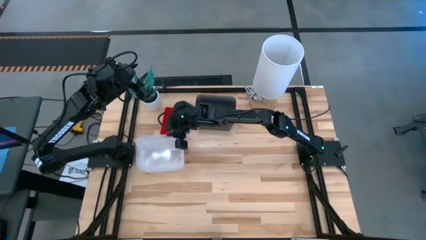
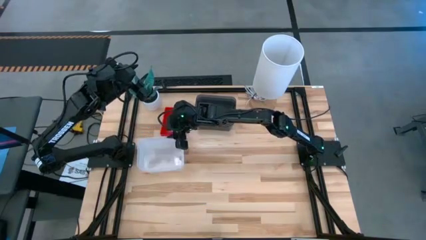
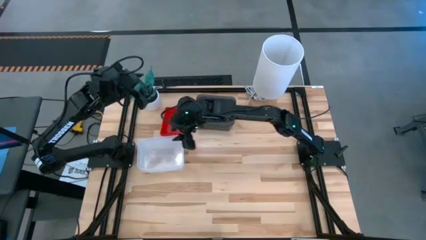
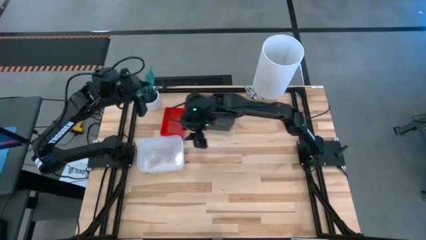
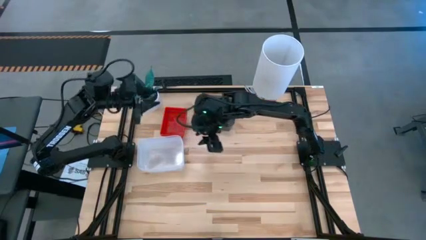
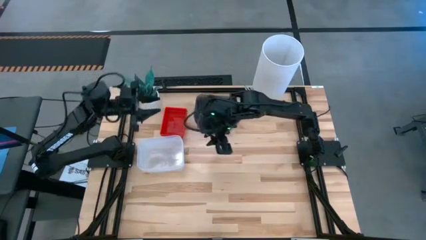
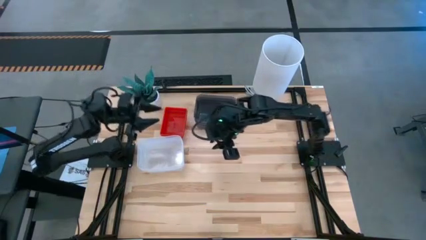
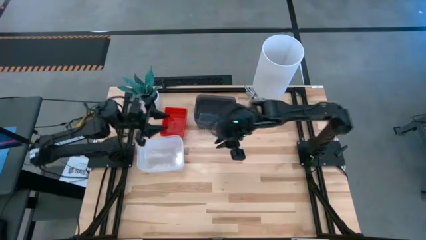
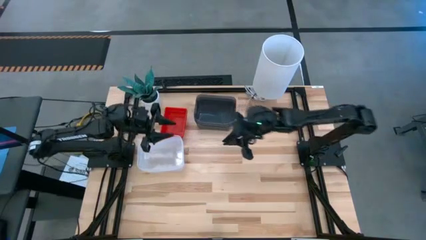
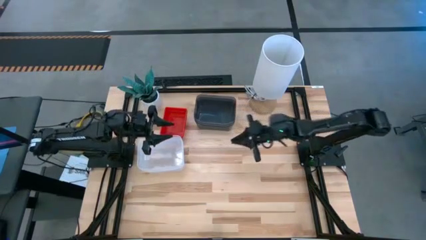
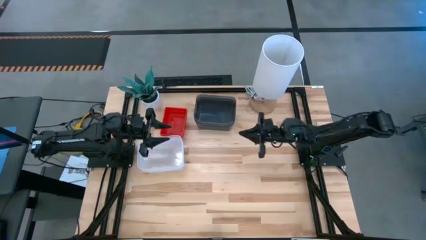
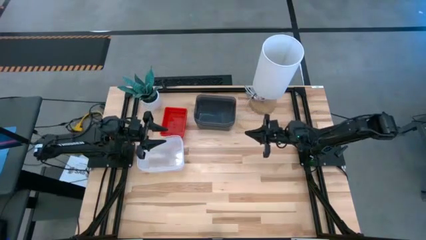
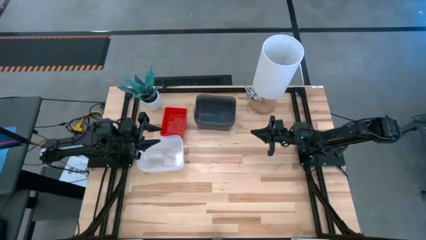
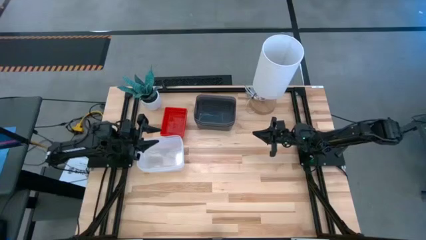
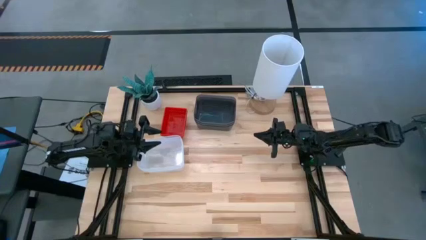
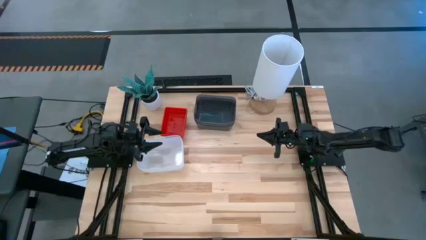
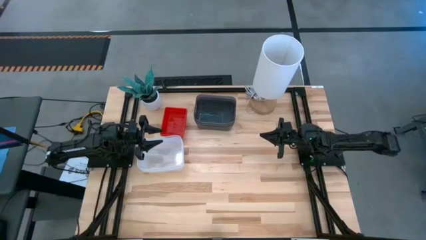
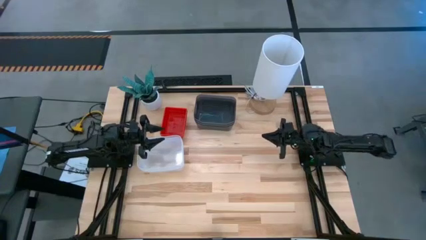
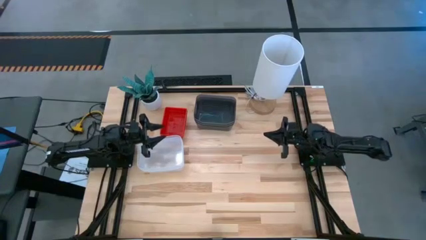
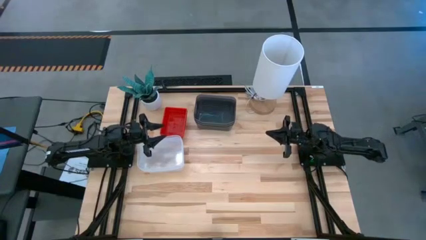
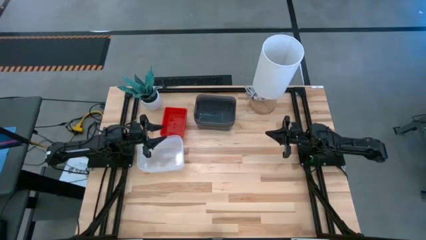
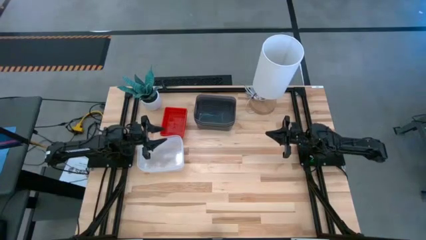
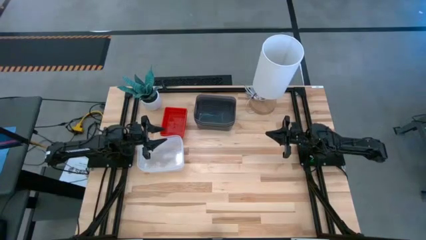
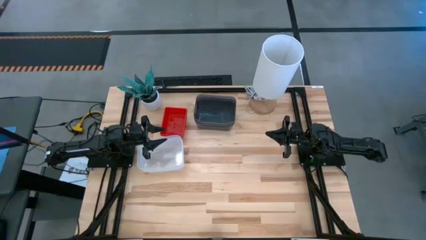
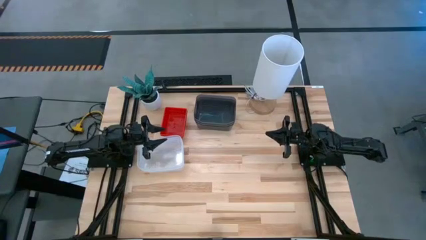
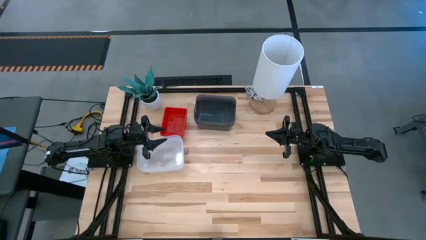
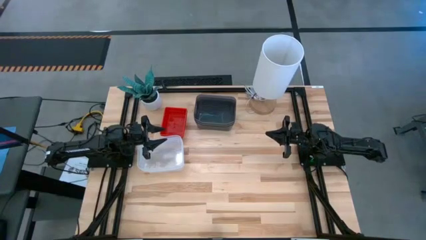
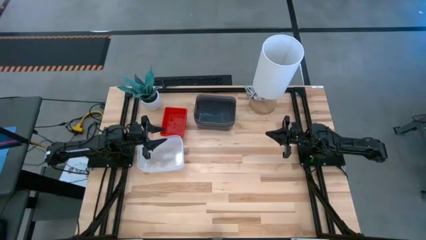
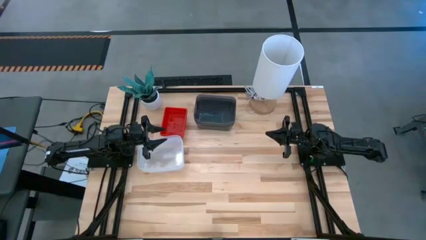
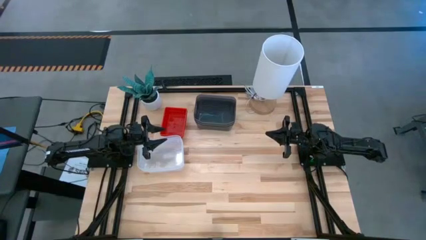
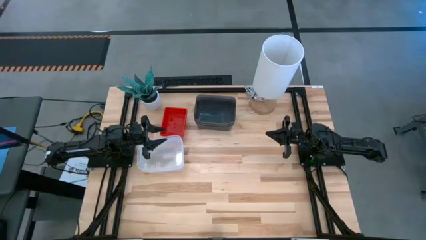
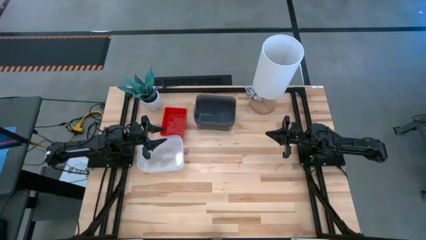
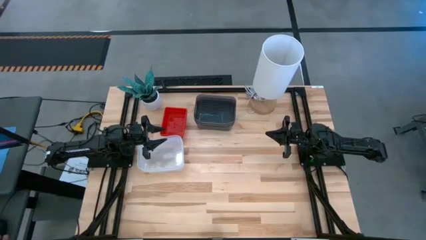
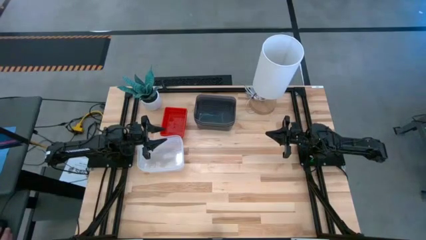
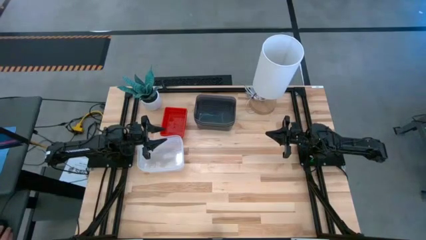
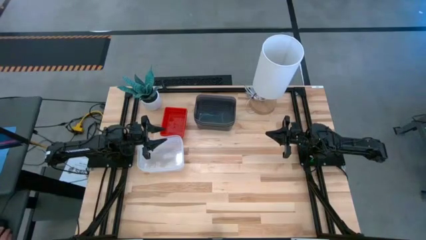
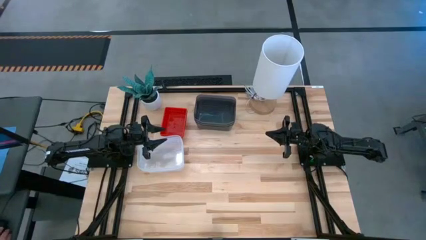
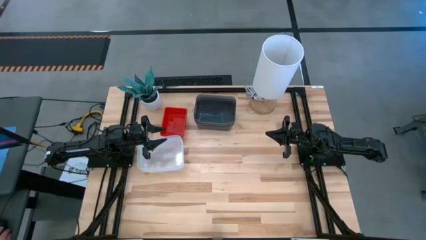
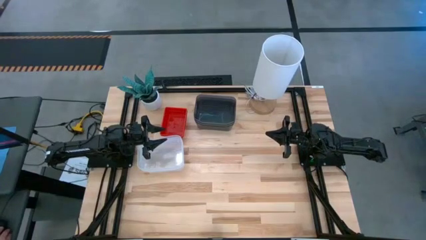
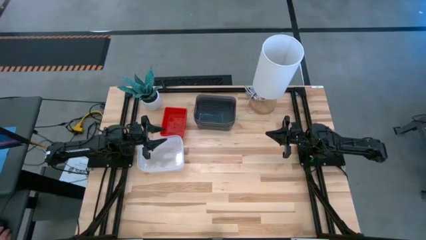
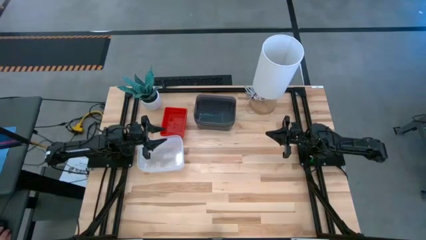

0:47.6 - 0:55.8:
Return to Home Position

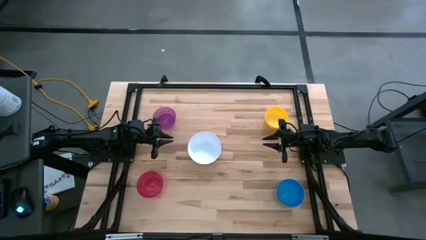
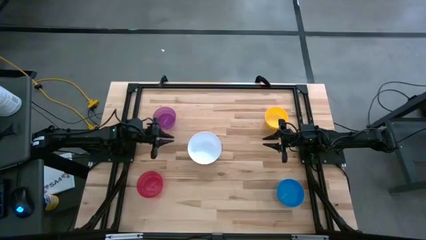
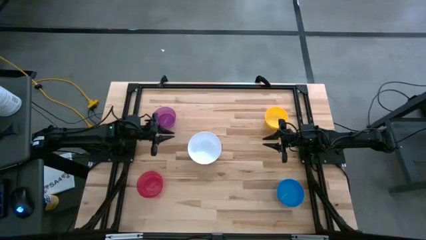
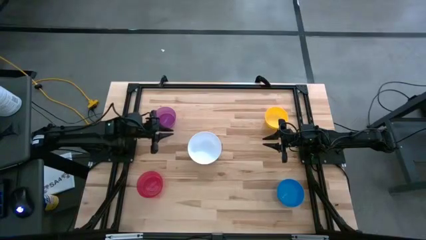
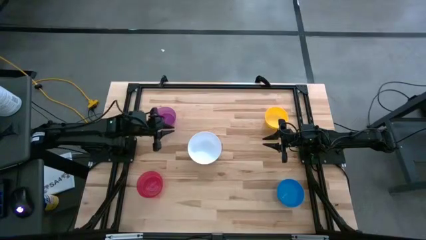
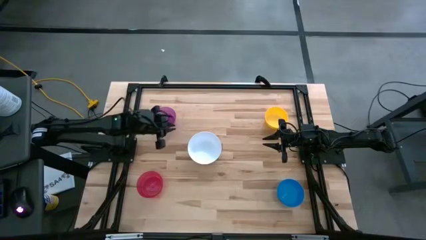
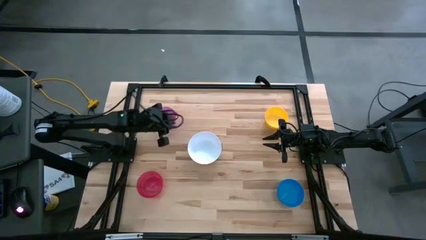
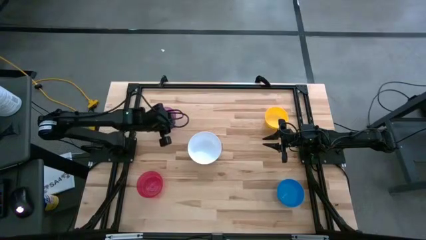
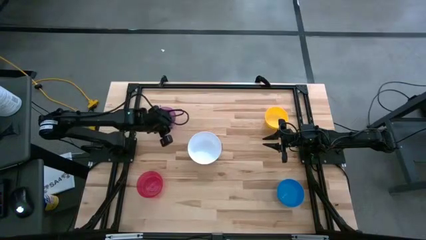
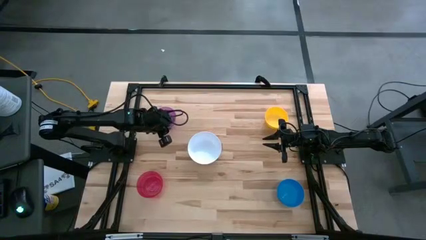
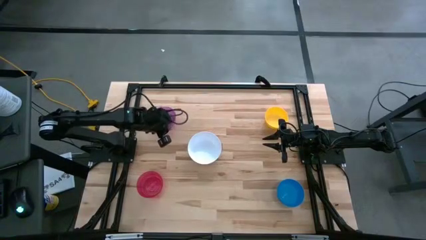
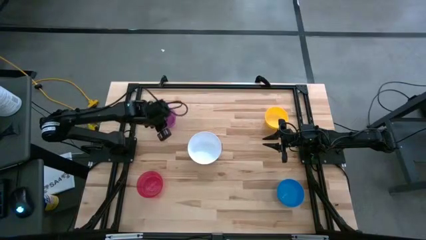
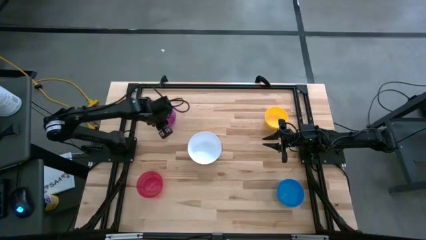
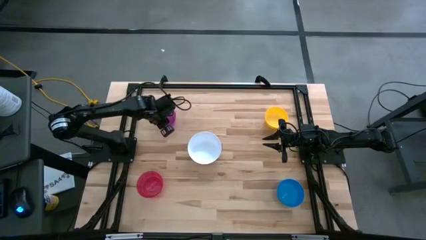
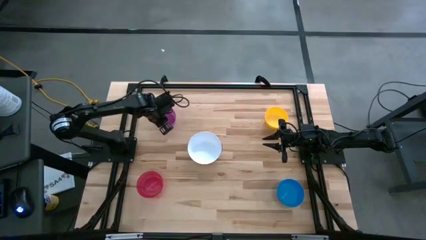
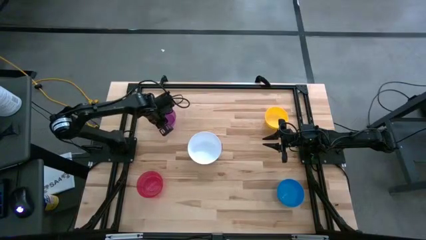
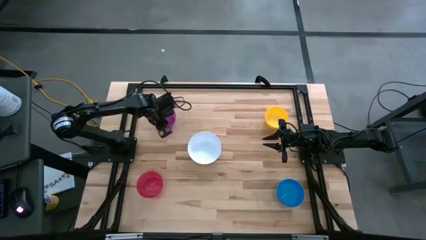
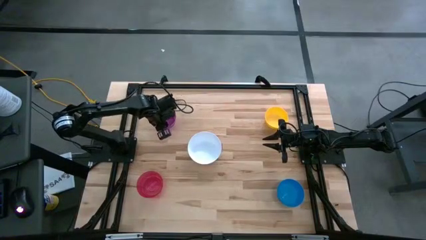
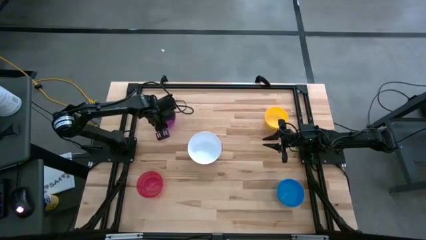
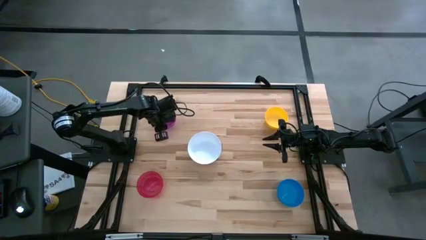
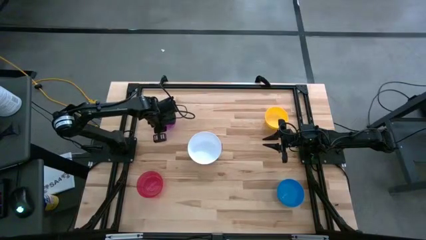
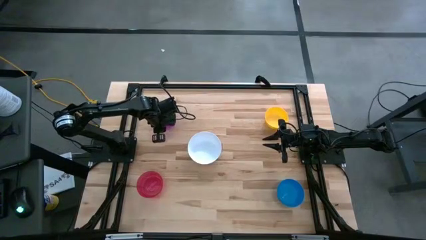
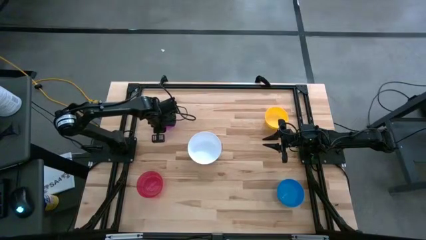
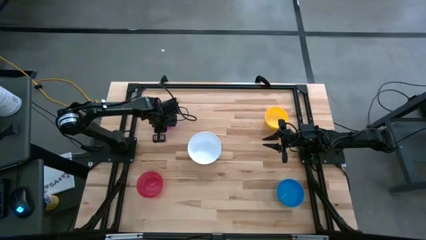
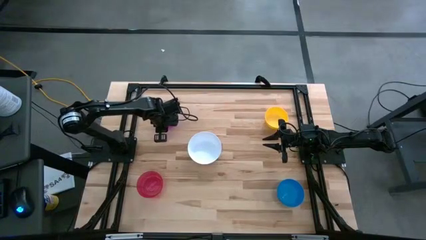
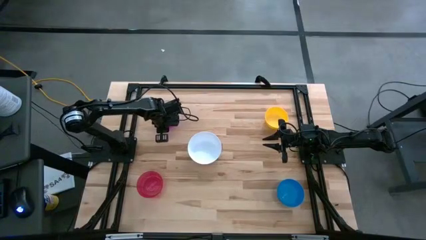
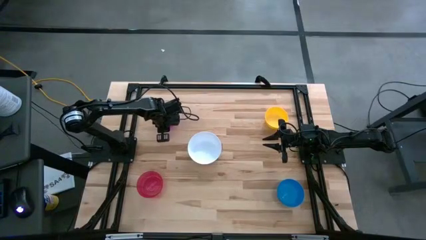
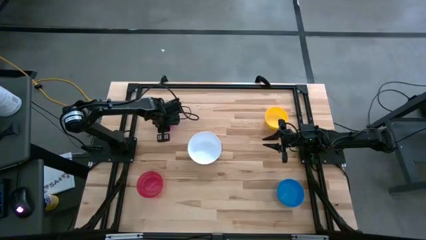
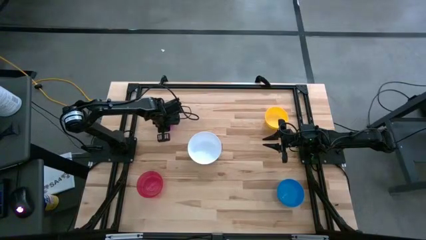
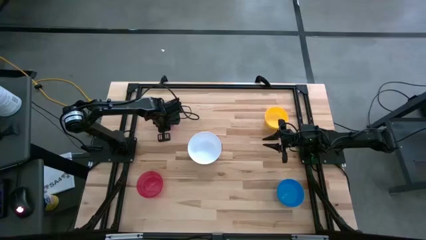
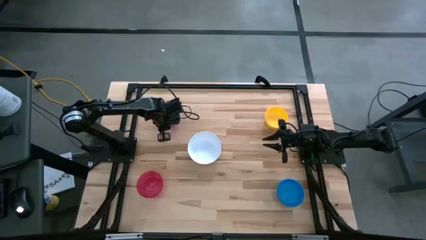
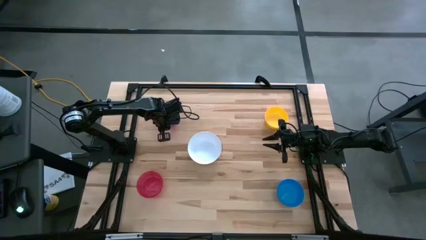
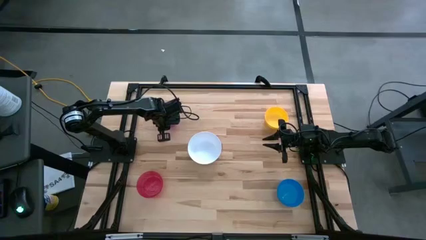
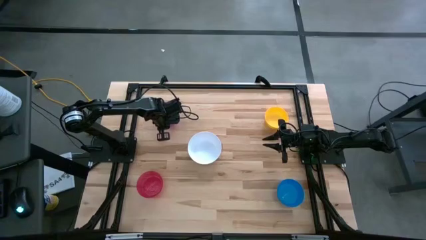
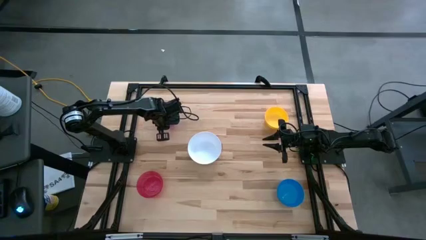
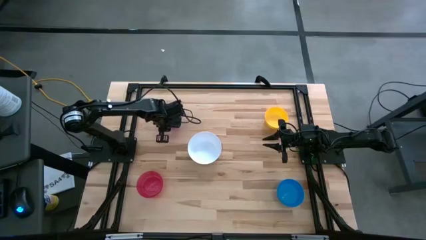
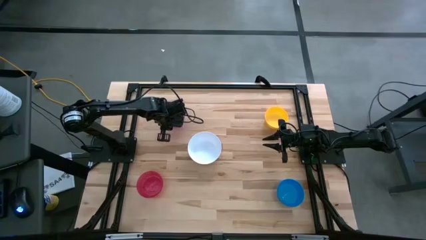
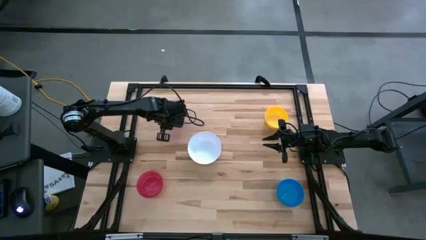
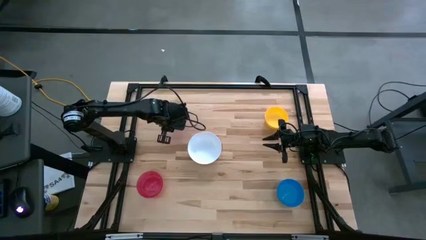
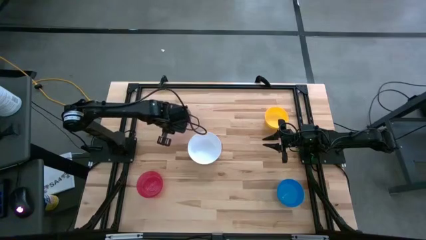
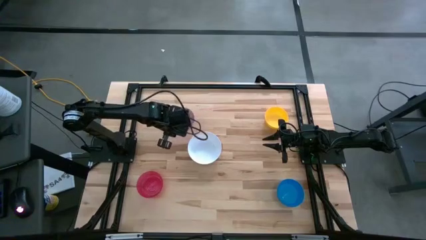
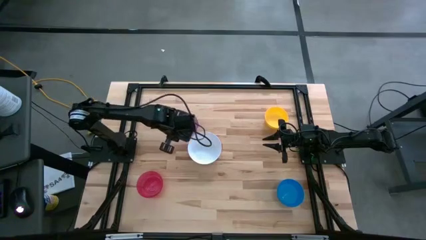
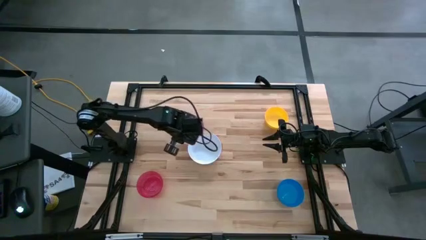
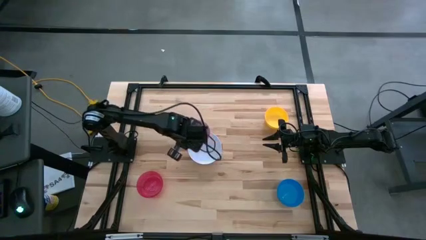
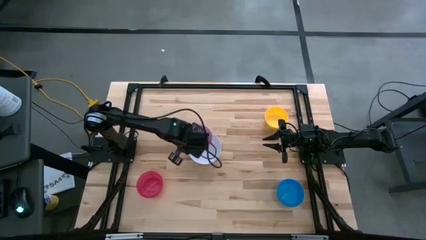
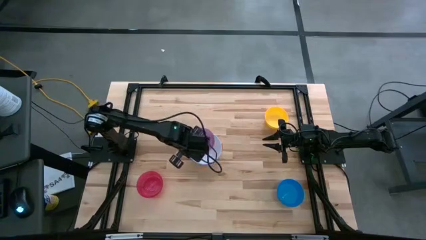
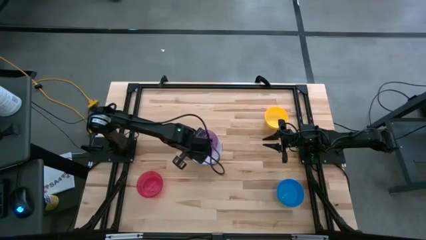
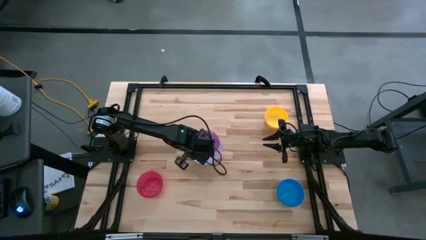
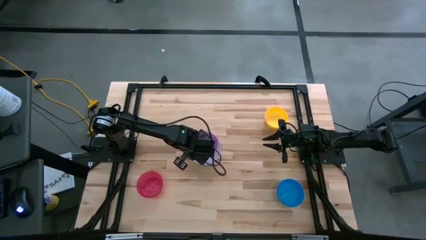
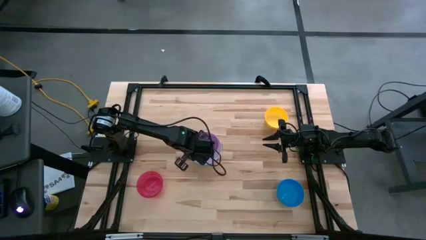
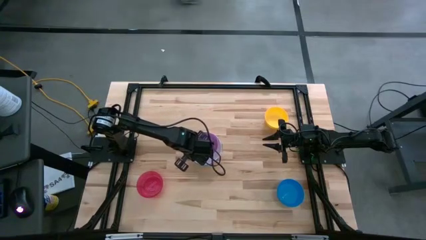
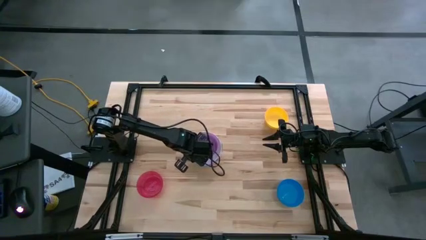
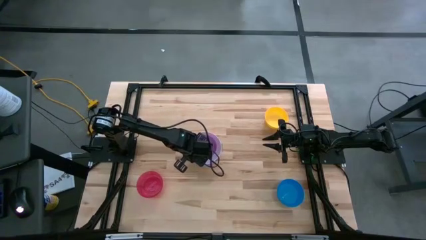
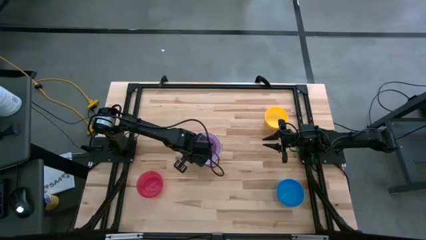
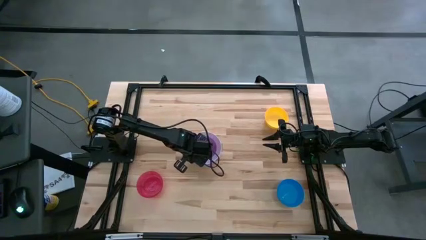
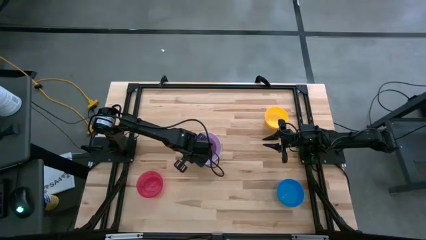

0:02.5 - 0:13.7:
Stack the violet bowl on the white bowl
